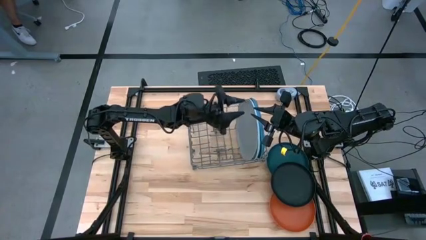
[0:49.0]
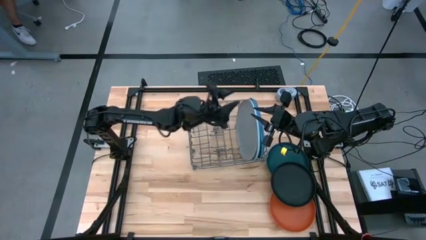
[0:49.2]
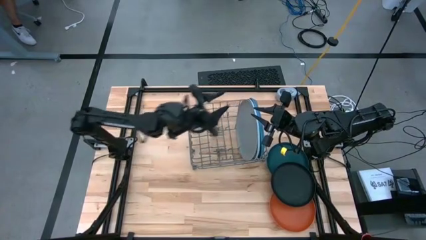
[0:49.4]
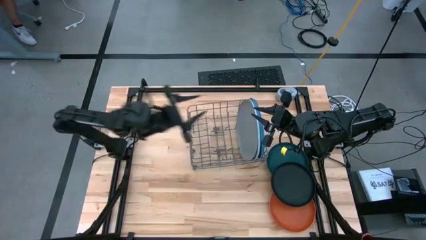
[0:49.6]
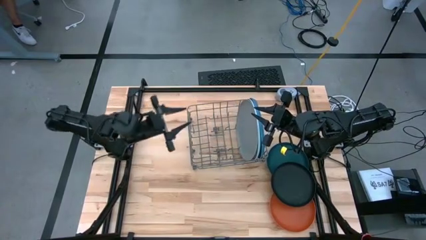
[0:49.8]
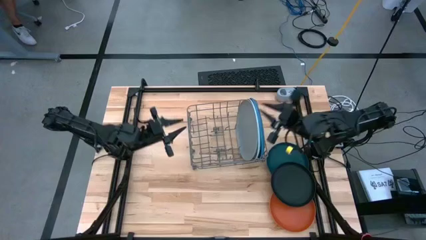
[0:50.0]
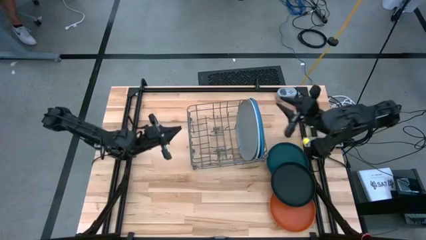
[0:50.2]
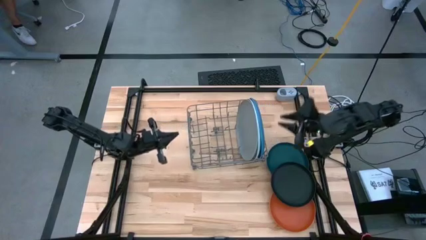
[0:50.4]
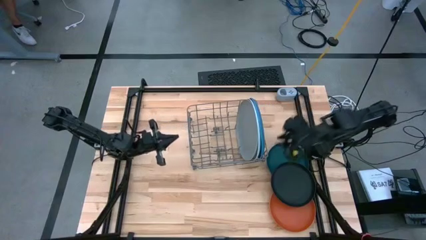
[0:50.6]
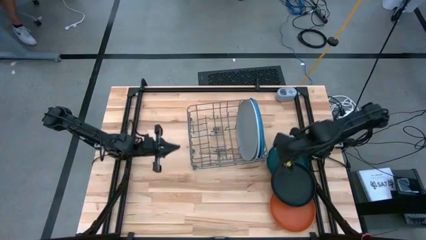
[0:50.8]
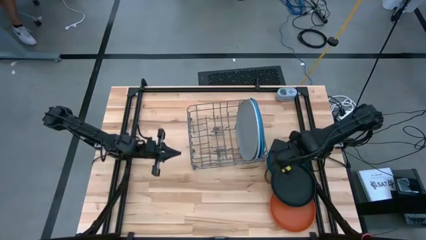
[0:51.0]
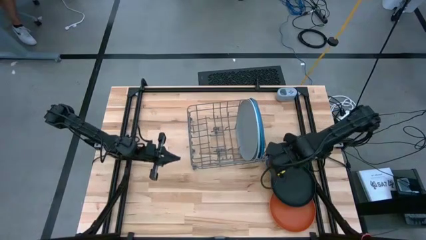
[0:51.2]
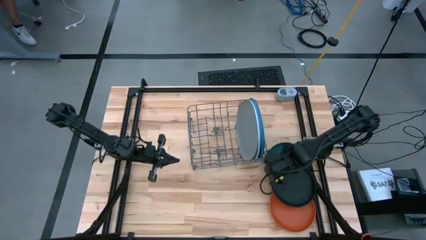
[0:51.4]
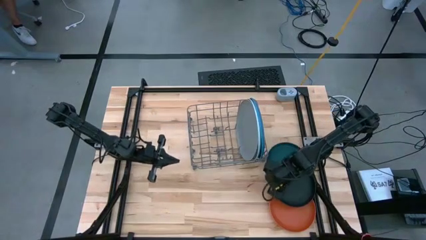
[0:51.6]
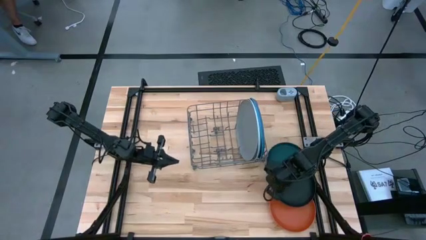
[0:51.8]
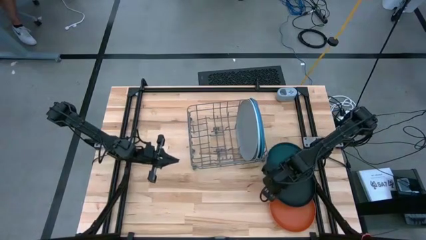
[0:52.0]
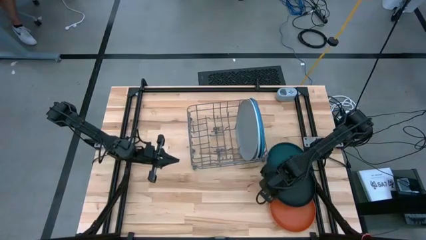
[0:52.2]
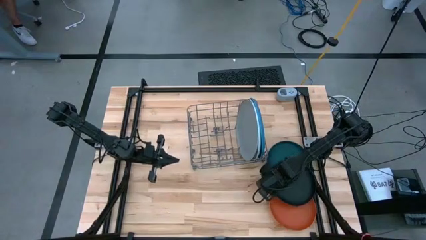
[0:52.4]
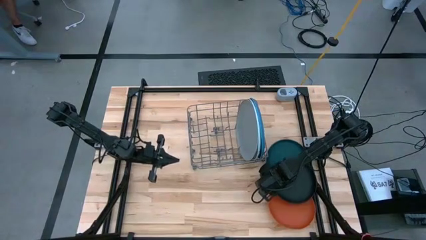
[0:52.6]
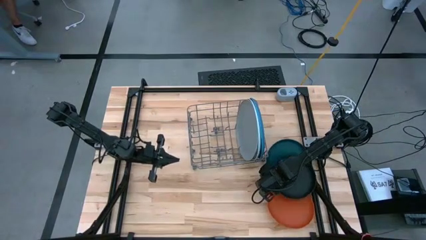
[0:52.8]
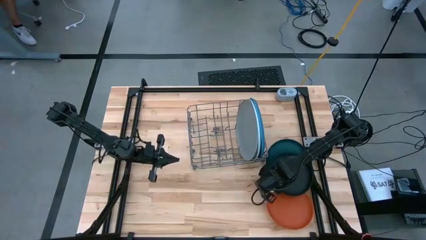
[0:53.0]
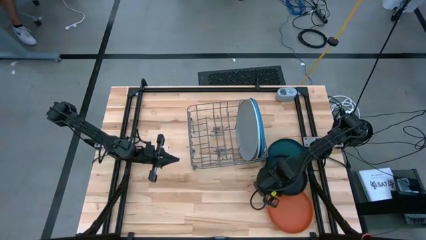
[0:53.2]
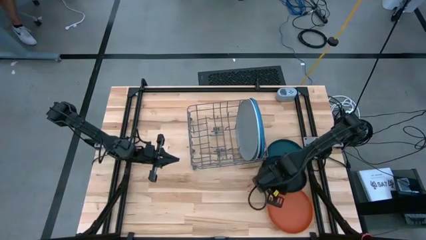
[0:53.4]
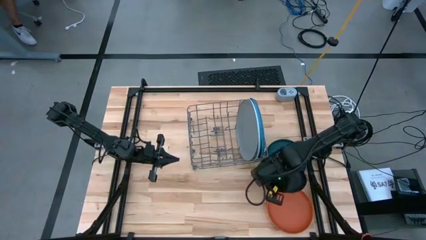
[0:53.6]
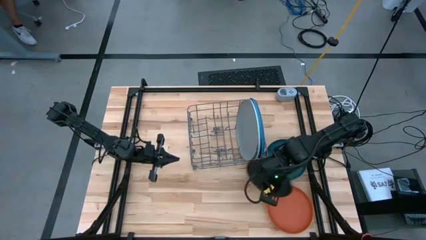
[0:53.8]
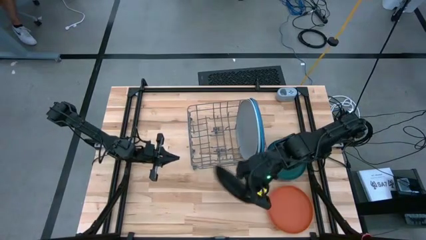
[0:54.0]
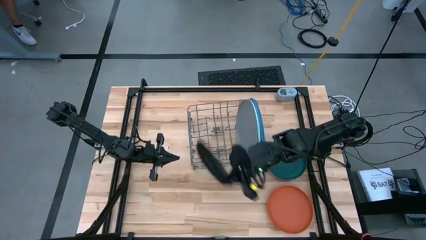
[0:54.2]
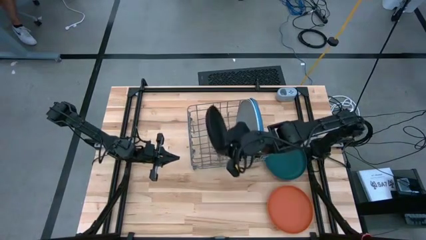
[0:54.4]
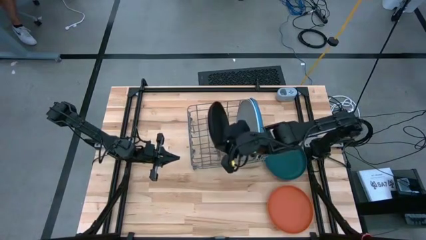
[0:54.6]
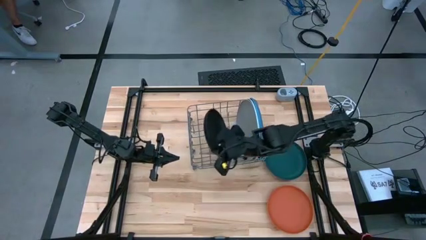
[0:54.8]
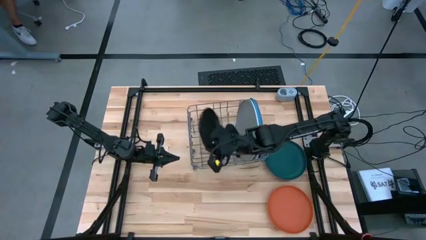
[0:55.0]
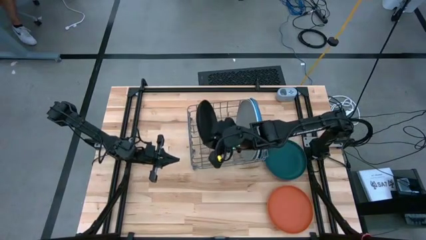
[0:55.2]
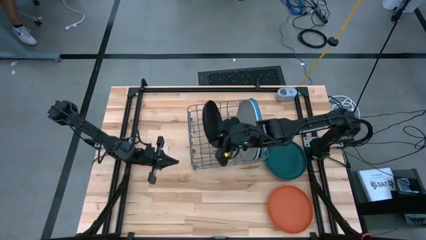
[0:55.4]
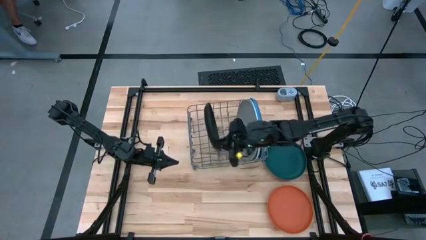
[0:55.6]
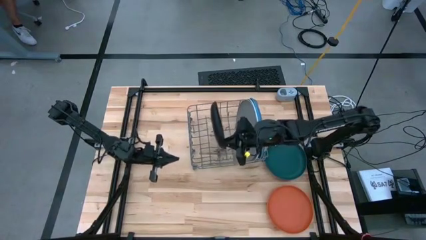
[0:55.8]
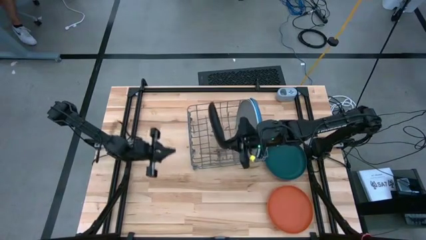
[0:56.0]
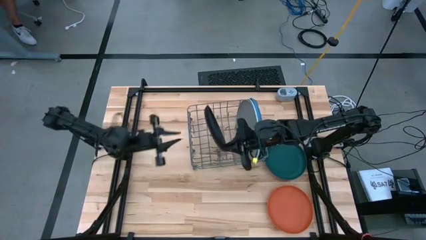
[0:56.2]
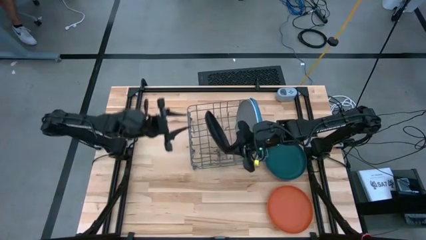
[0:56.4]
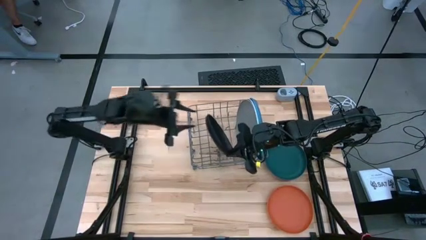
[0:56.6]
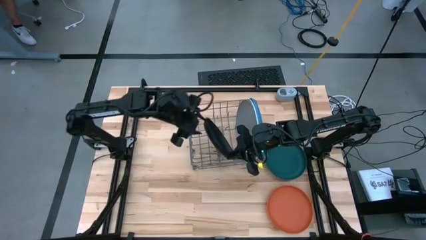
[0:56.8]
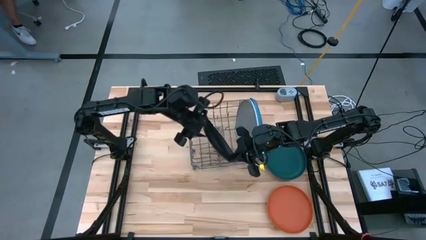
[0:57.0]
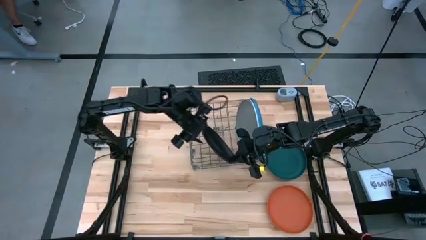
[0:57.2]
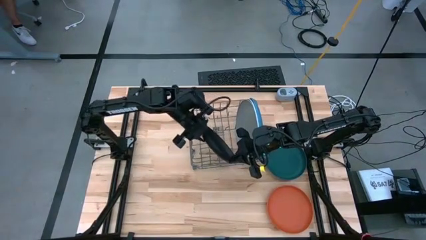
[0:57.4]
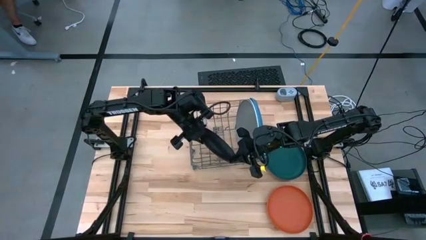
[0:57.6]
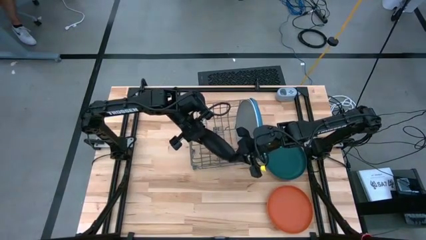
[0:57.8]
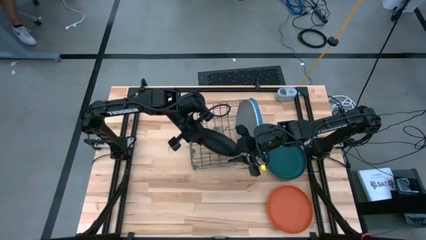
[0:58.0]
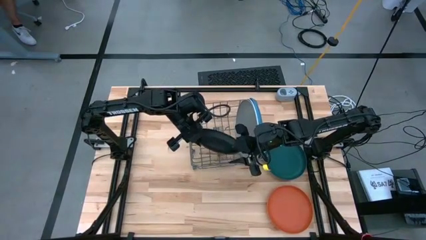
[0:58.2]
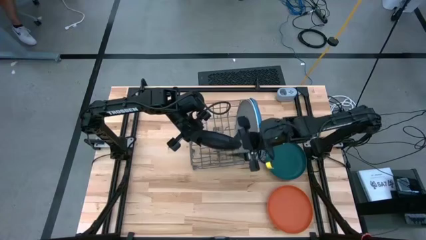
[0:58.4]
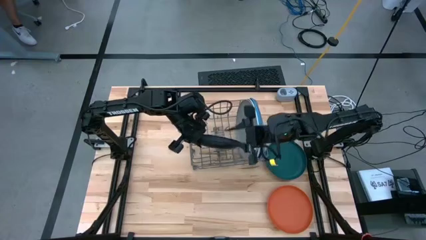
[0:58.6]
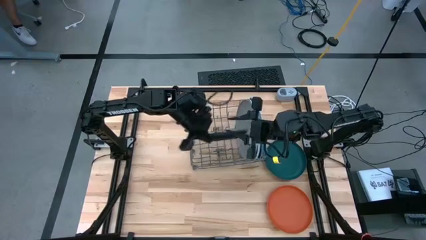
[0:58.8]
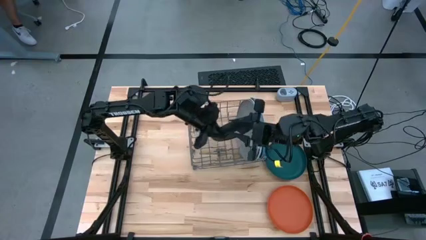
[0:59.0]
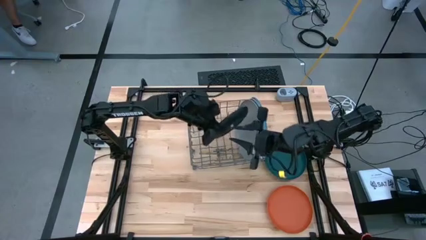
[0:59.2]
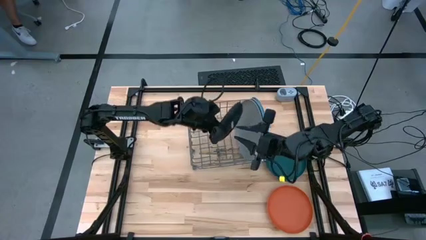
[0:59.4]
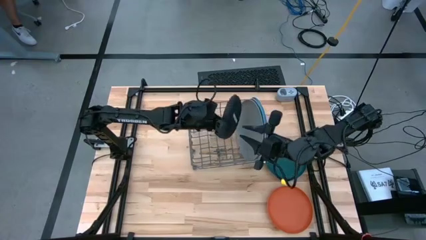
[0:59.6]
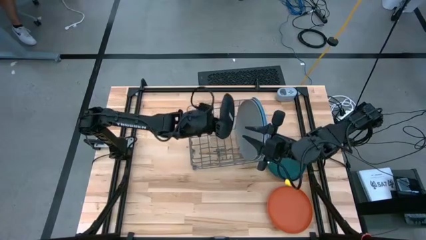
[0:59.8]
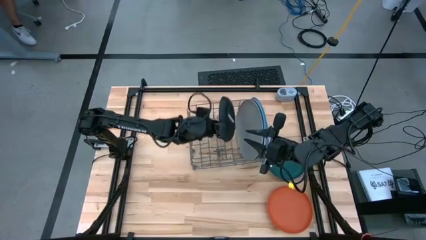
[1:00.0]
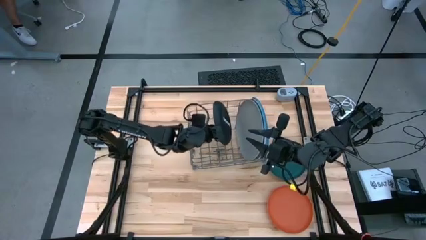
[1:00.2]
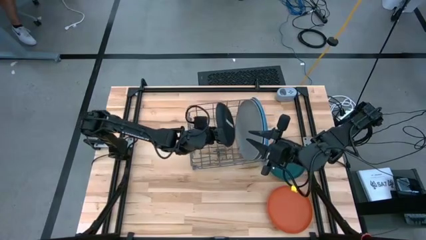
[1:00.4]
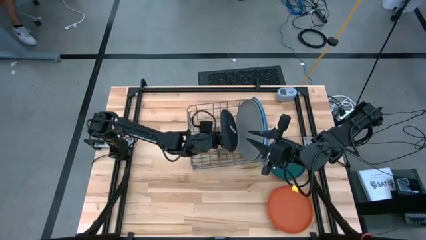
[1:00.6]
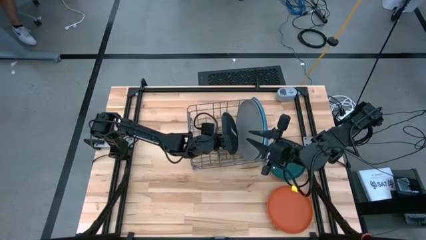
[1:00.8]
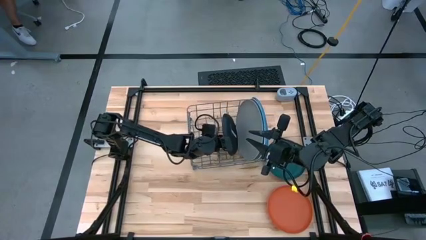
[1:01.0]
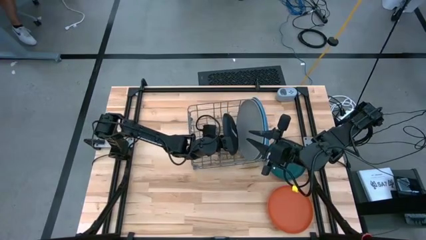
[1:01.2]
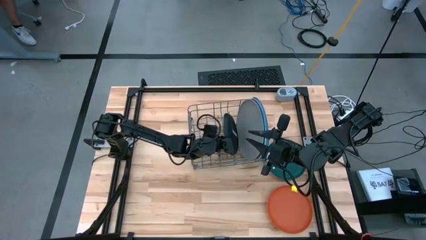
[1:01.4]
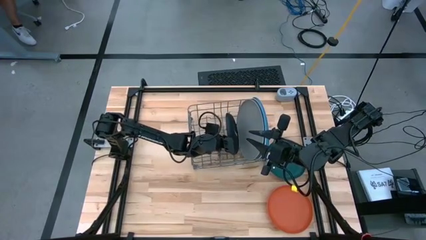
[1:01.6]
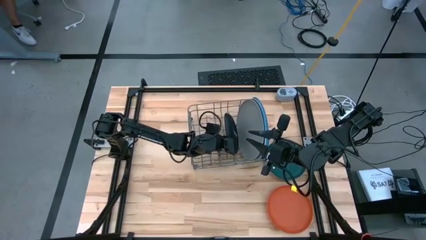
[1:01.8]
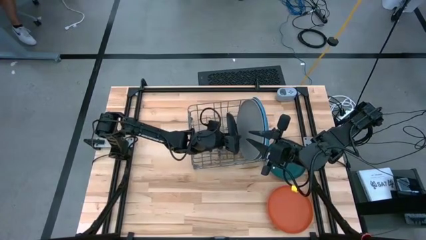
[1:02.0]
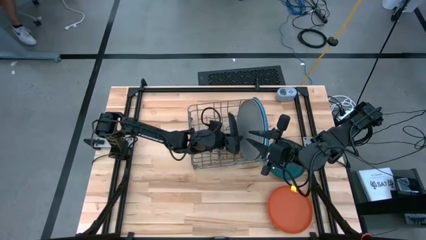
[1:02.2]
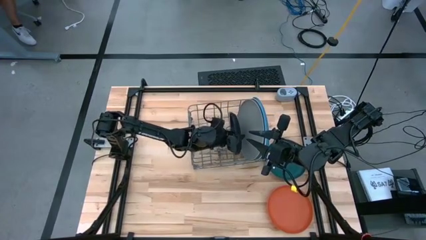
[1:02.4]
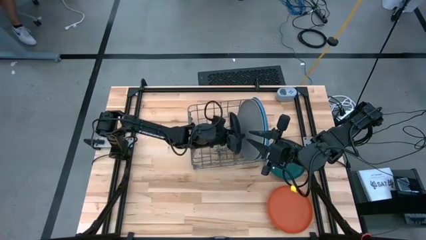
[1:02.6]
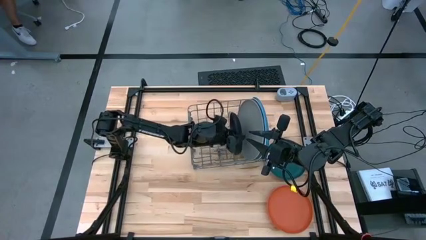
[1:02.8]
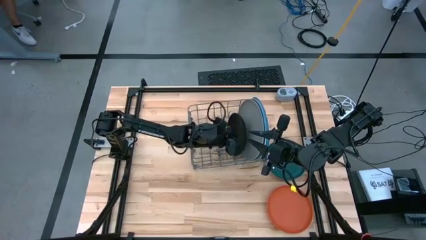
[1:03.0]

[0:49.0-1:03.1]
Task: Sort dishes
Put the black plate into the dish rack
